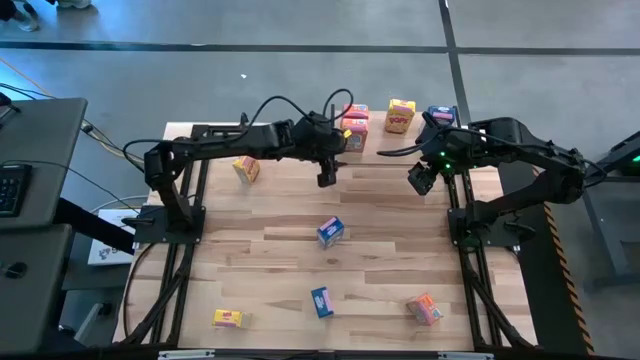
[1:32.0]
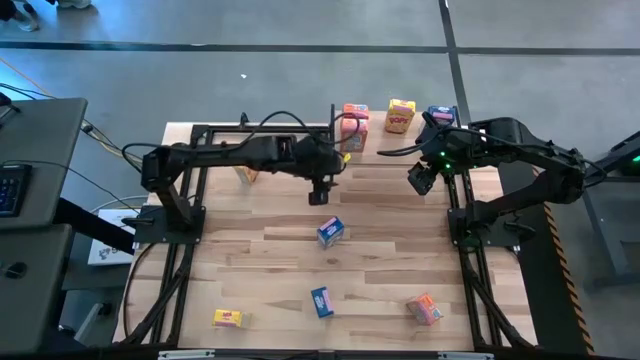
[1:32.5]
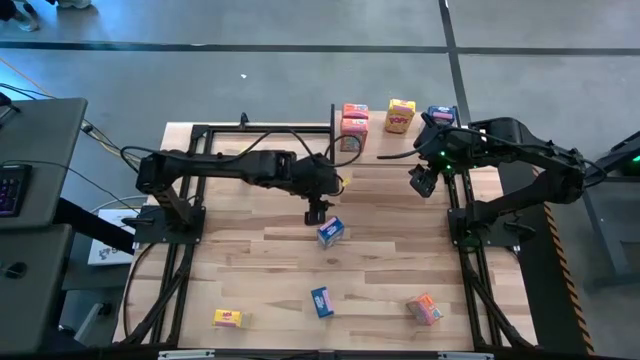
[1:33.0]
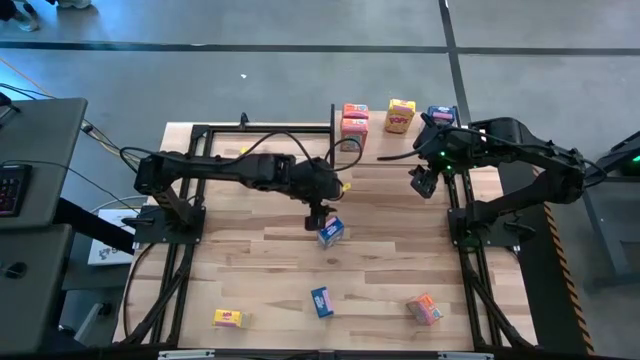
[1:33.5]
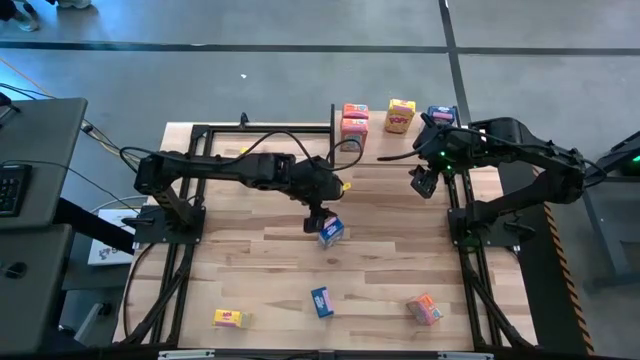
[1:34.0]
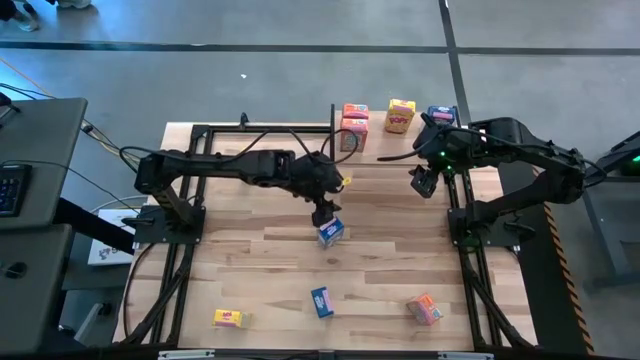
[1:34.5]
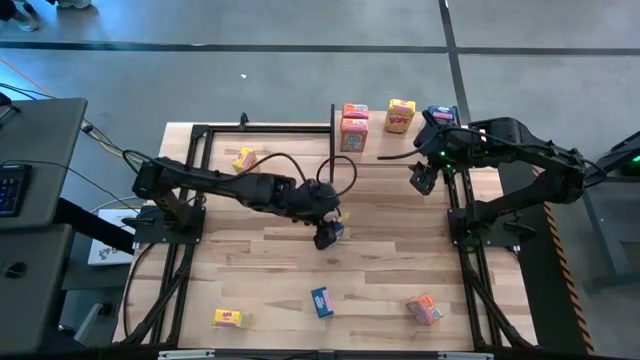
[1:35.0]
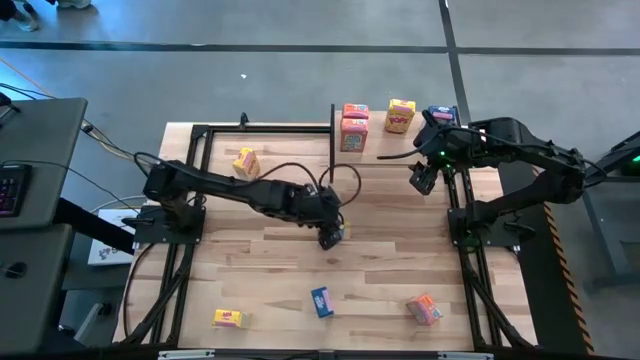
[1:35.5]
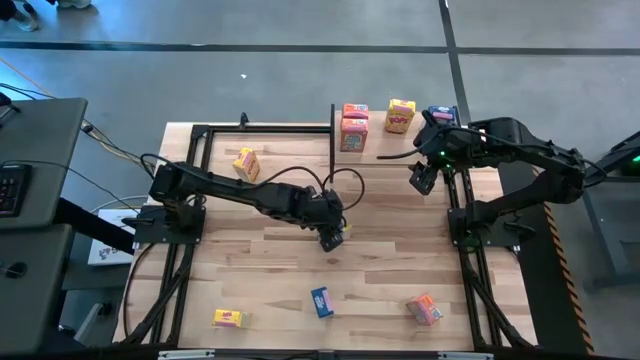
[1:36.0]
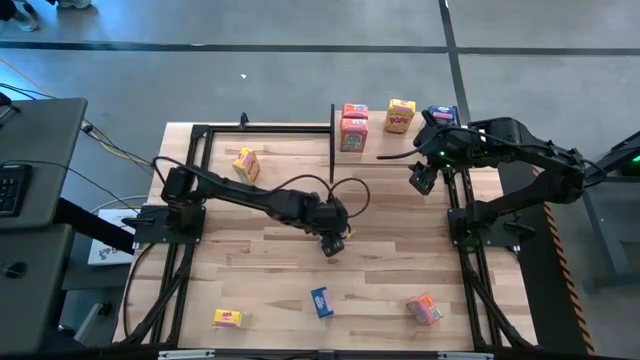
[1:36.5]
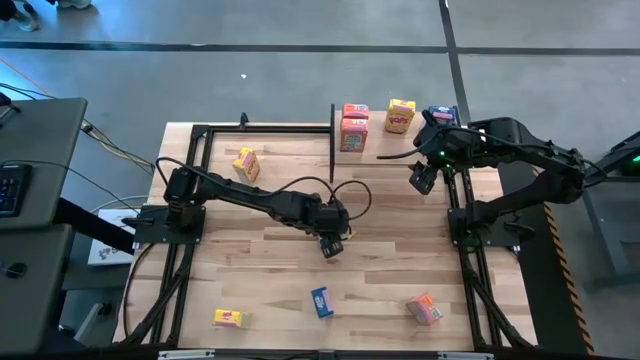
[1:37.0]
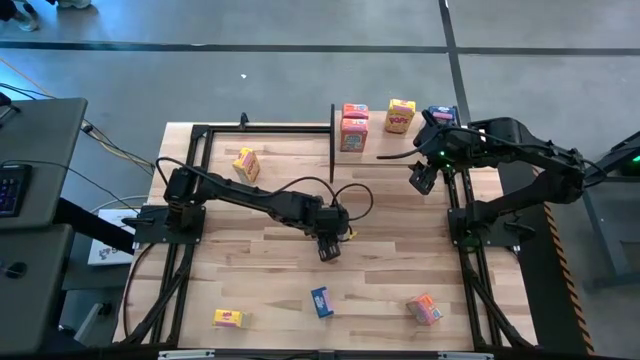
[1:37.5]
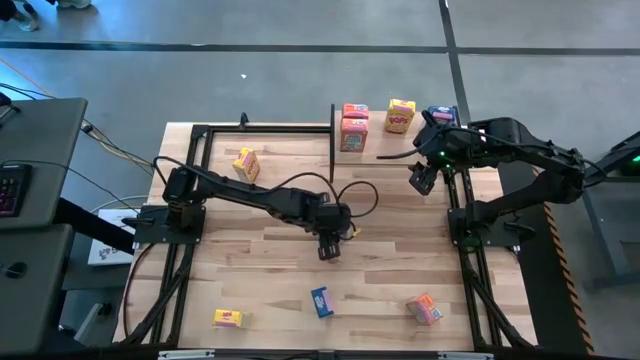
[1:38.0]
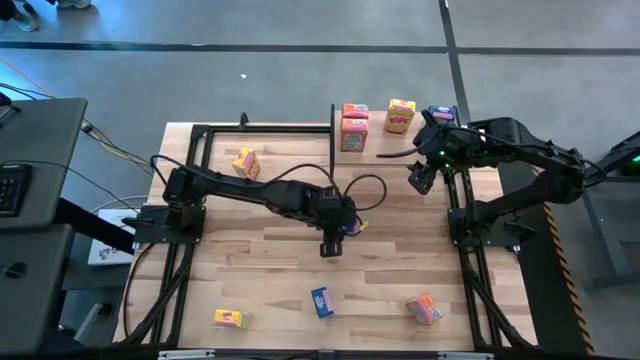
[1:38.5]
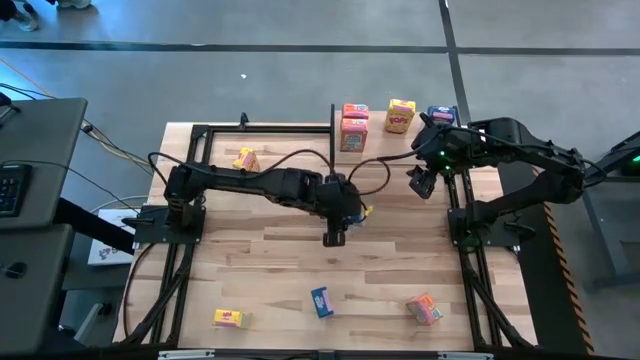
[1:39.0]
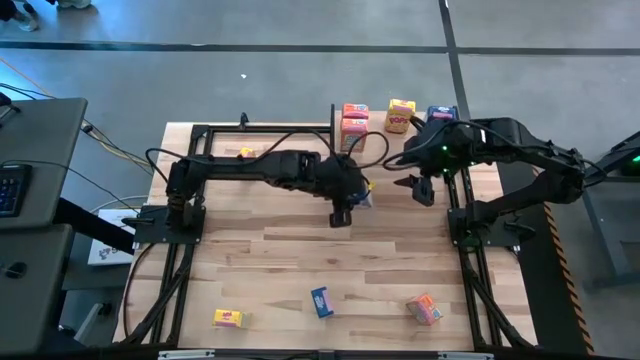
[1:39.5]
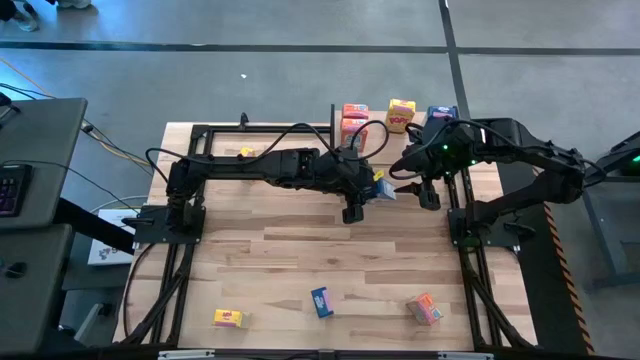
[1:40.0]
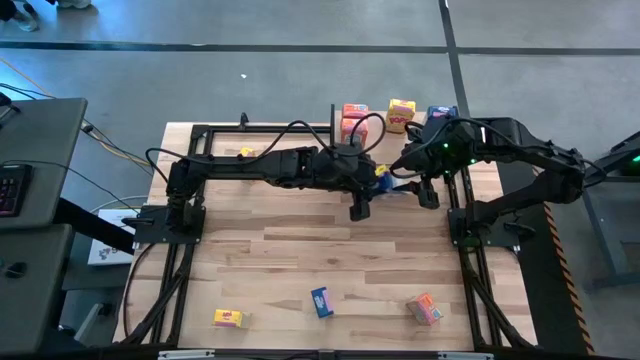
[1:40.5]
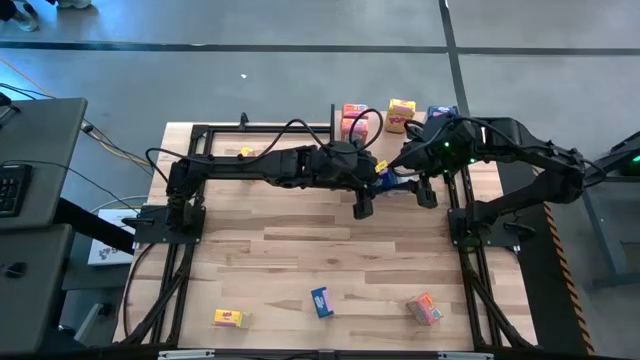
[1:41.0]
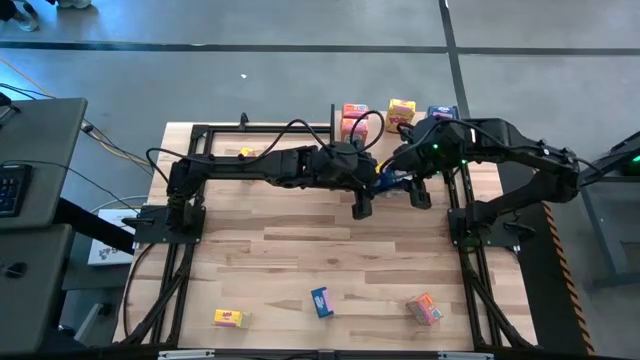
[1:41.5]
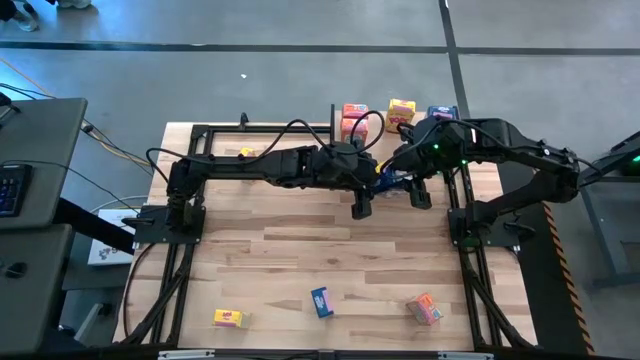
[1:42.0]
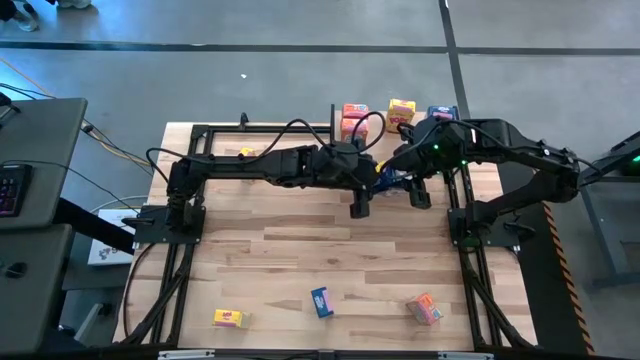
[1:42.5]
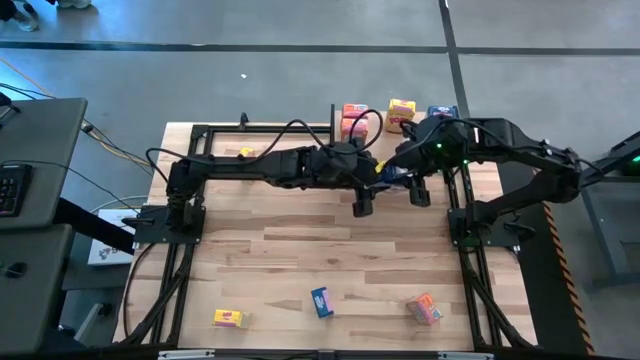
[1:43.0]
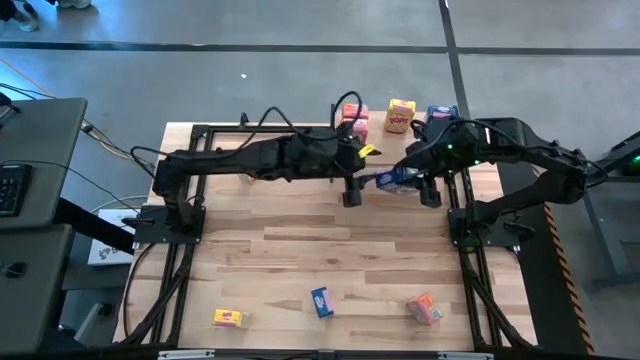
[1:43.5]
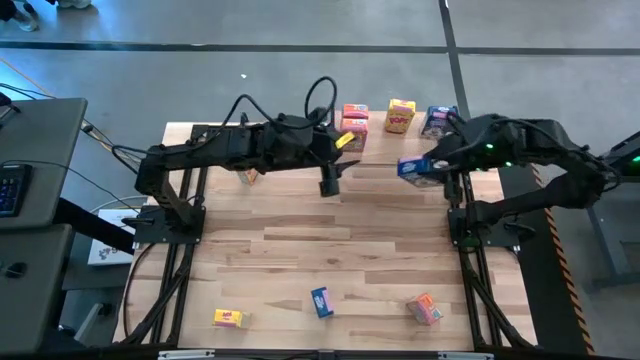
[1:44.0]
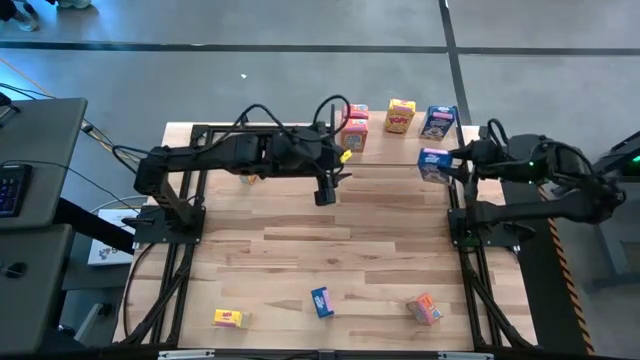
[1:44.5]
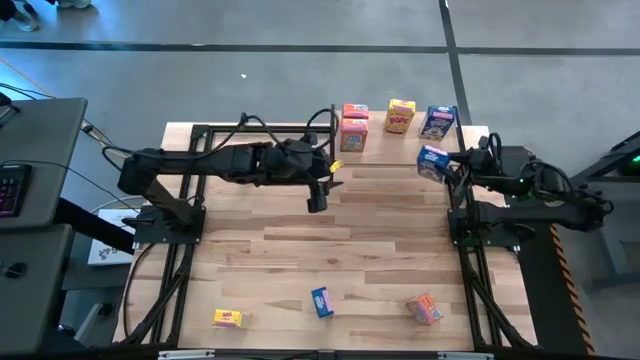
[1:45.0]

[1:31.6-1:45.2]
Task: Stack cereal on shelf
Put the top blue cereal box on the shelf aligned with the other blue cereal box

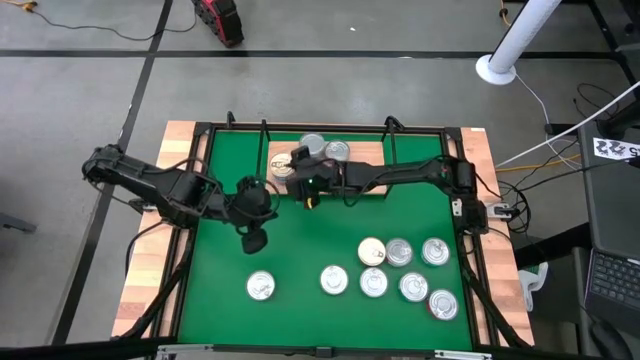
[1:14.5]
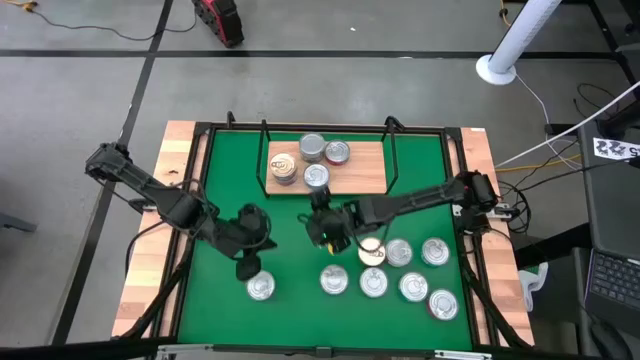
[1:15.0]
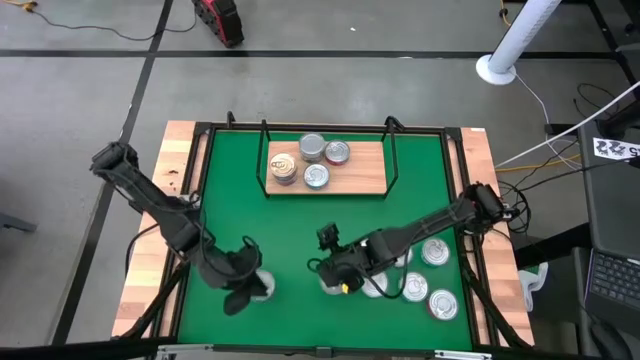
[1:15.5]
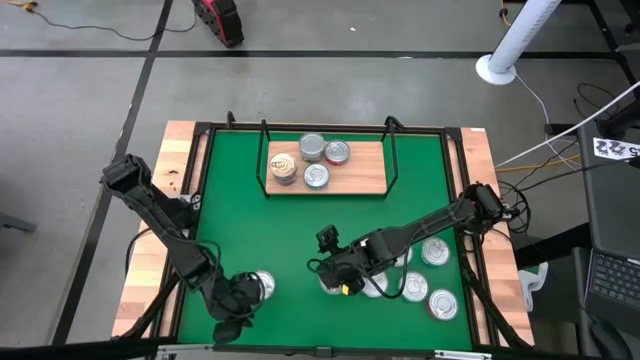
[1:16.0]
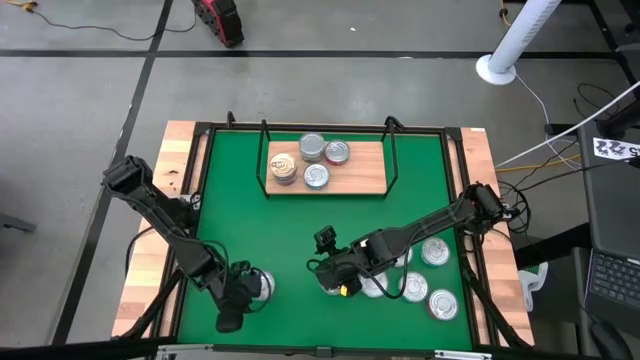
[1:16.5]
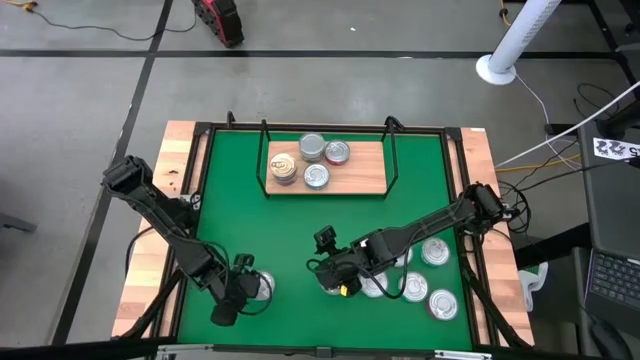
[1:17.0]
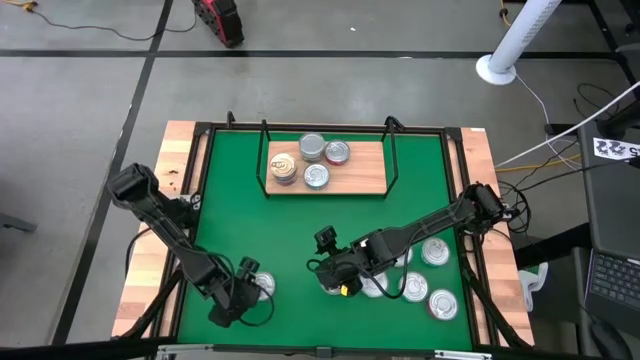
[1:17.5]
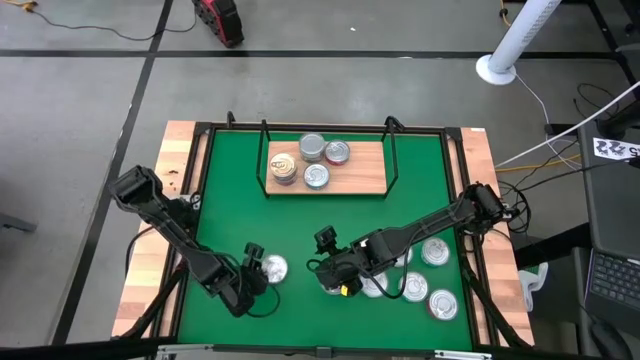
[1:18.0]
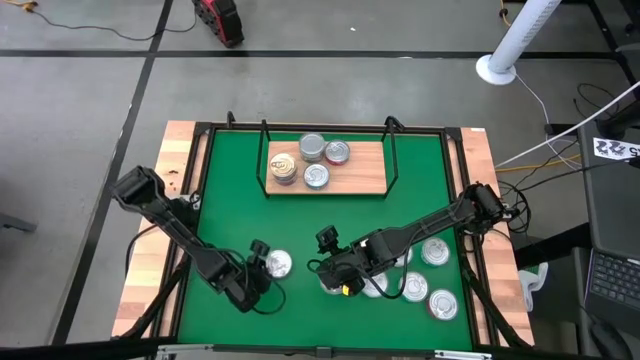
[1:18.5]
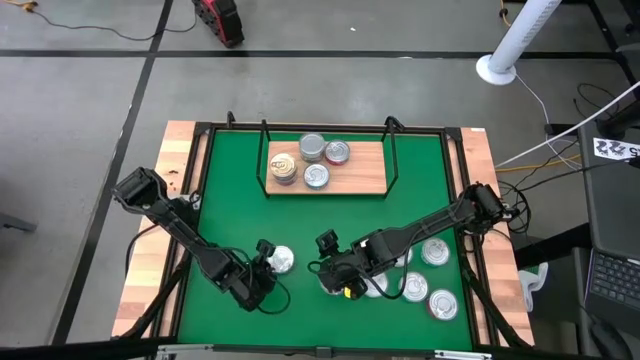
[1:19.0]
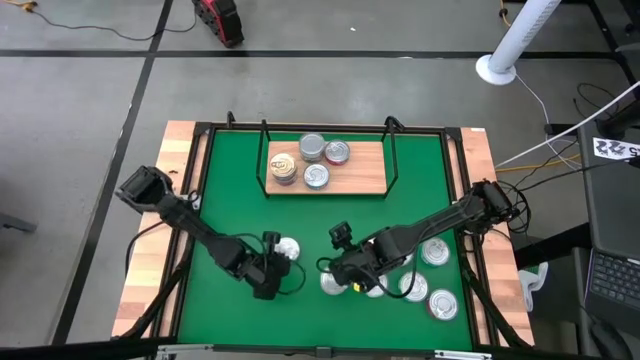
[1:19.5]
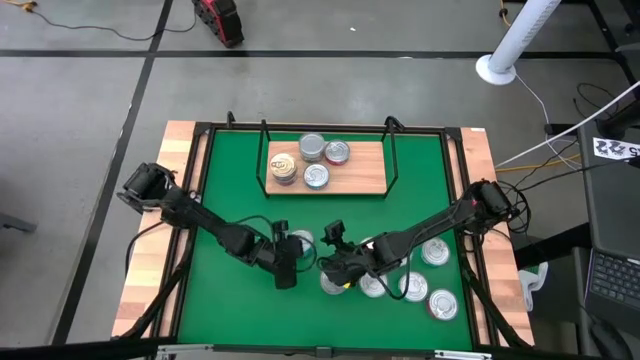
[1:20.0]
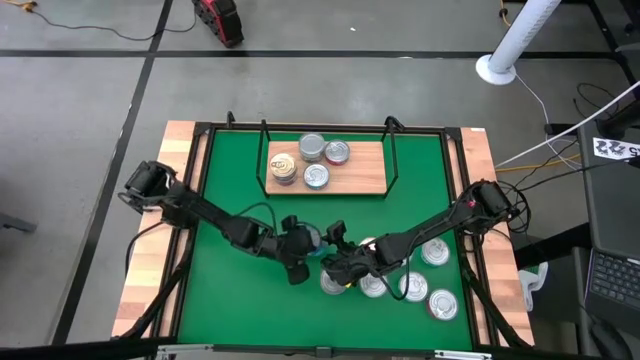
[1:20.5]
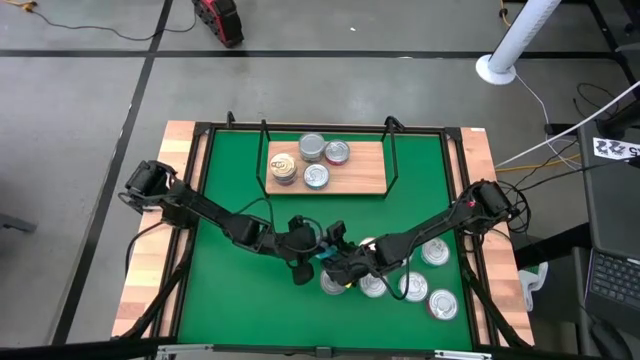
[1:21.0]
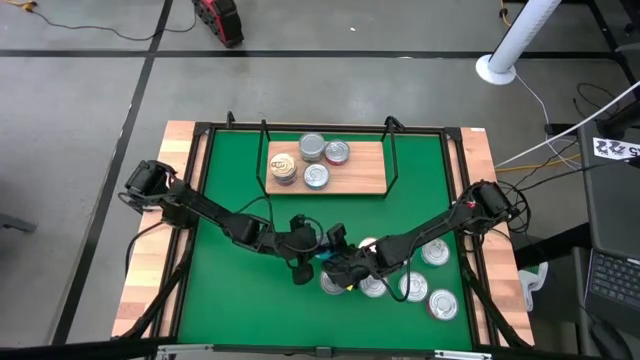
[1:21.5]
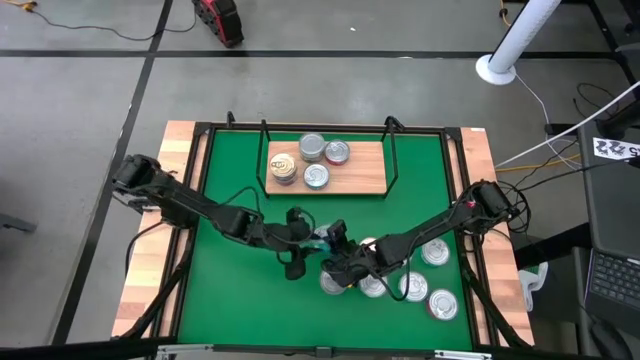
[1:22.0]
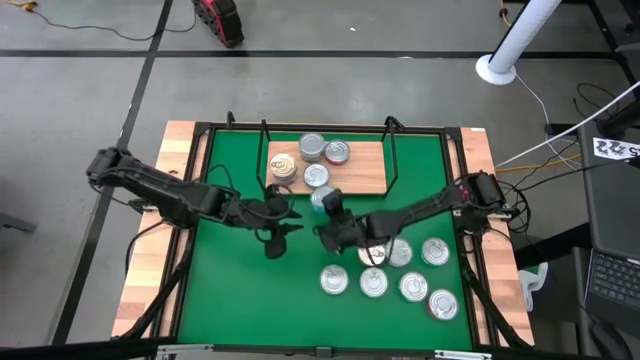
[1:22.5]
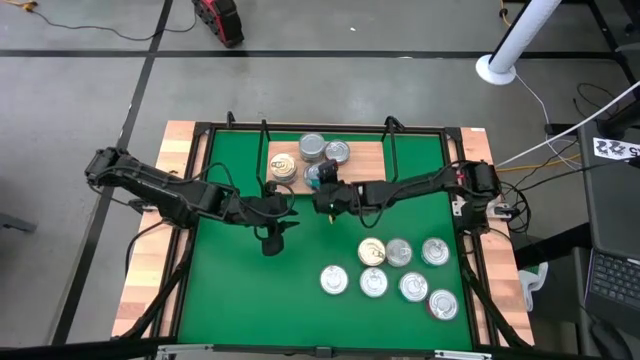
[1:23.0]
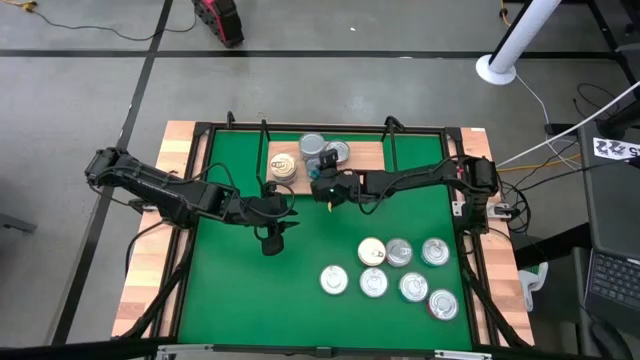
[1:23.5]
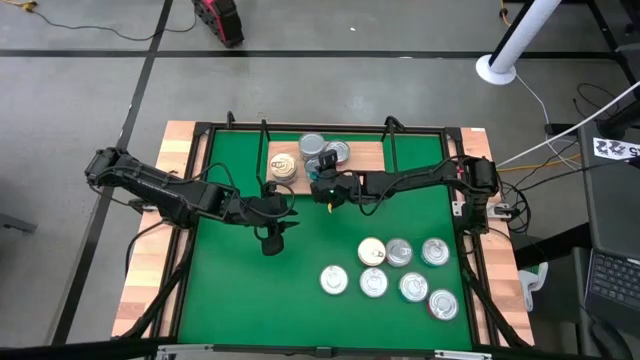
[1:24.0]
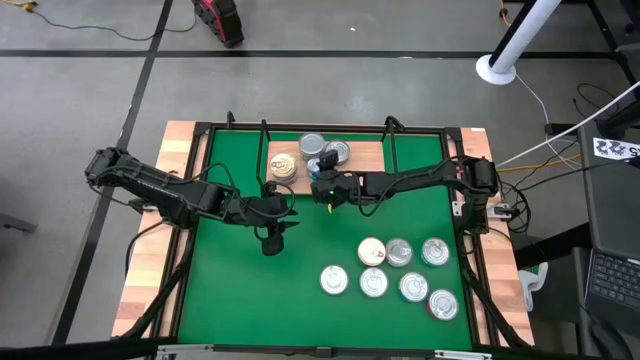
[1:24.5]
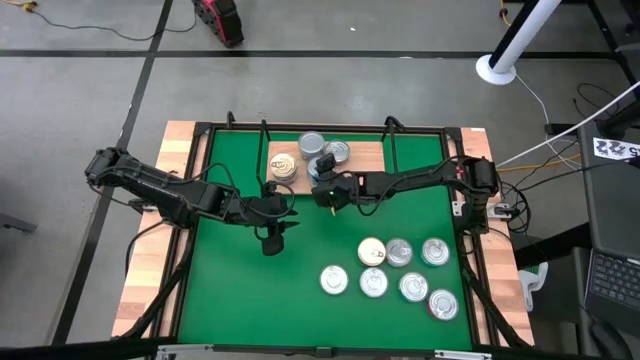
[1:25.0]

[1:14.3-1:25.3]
Task: Stack canned seafood by type on shelf
Stack the yellow blue tuna can on top of the other yellow blue tuna can on the shelf
